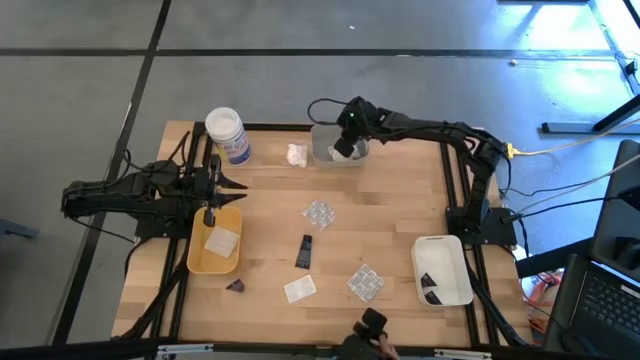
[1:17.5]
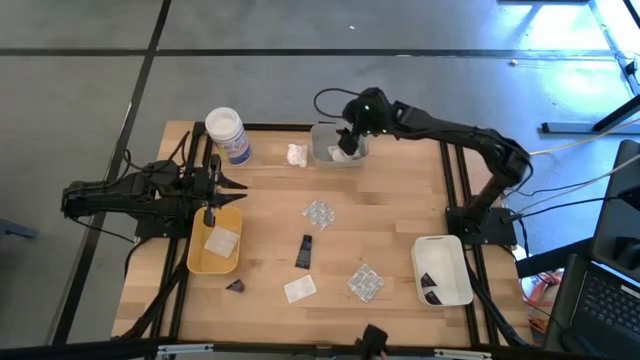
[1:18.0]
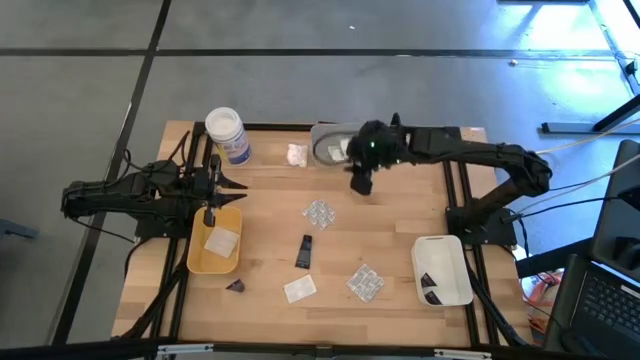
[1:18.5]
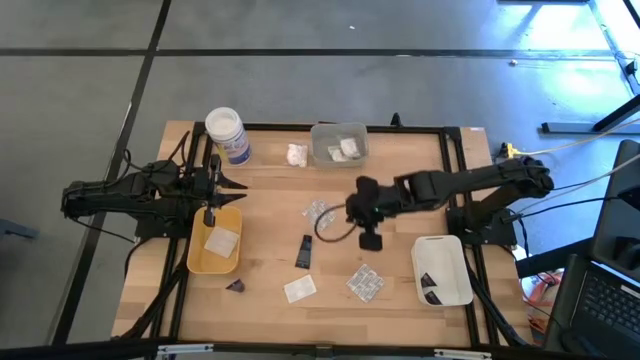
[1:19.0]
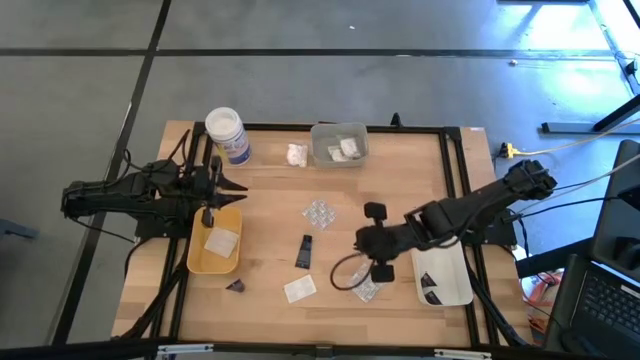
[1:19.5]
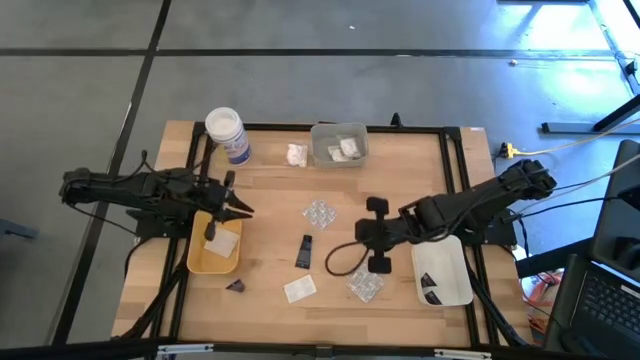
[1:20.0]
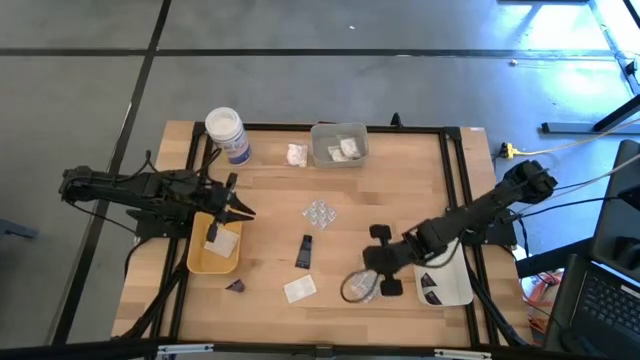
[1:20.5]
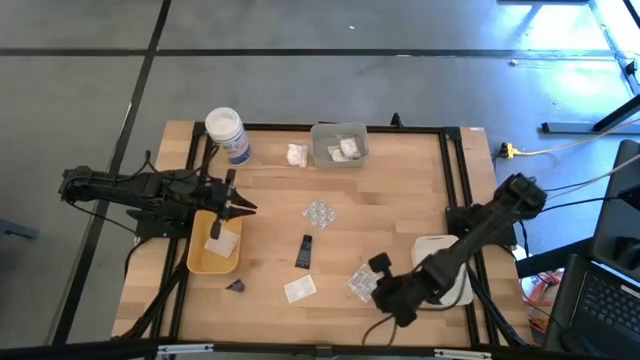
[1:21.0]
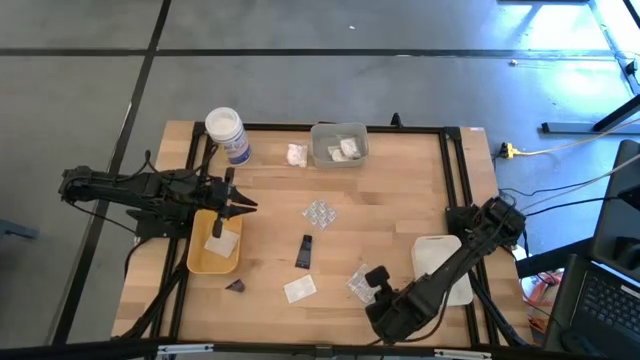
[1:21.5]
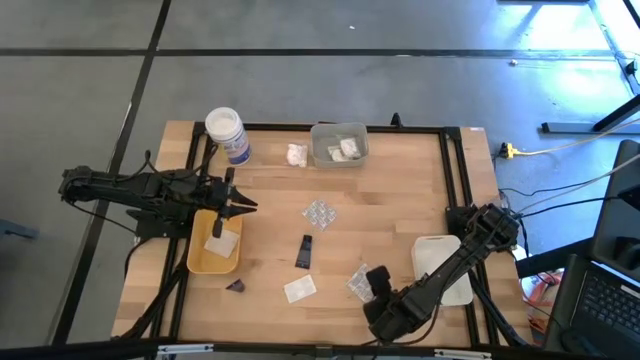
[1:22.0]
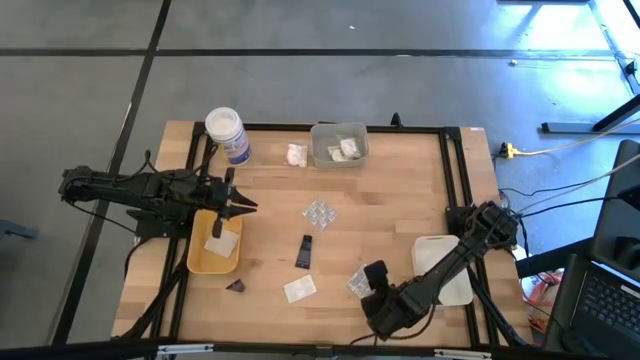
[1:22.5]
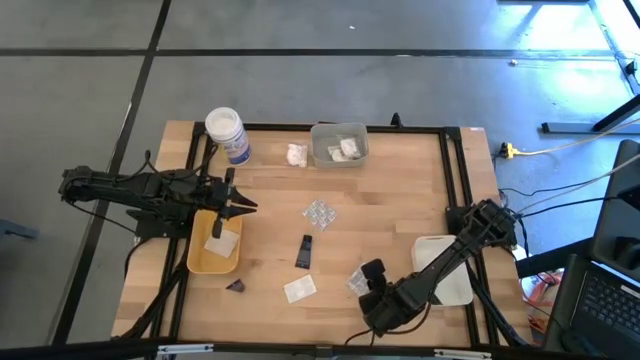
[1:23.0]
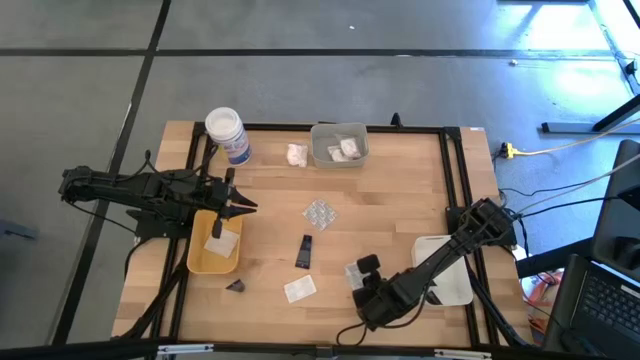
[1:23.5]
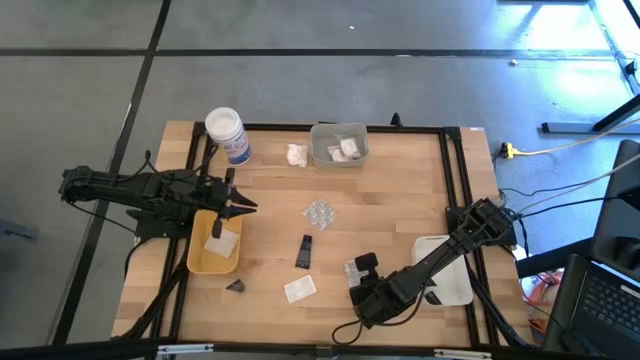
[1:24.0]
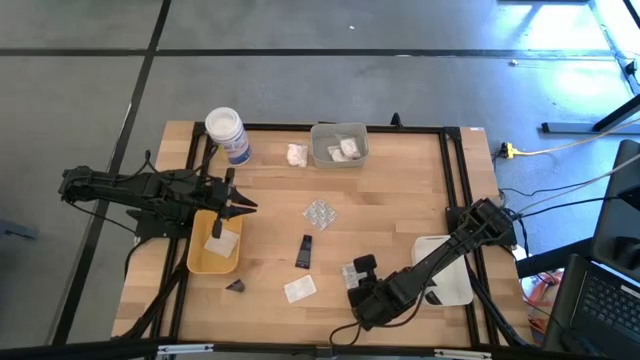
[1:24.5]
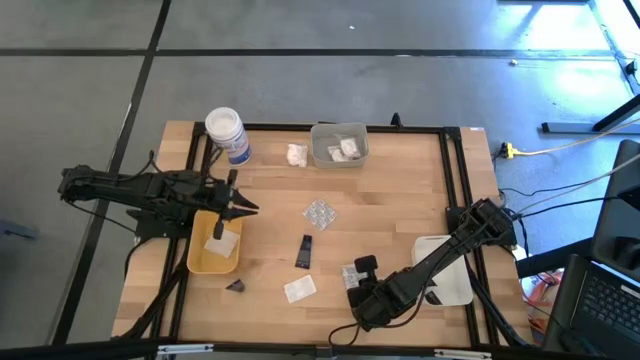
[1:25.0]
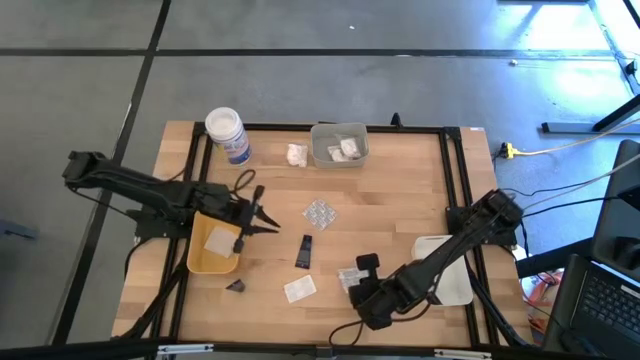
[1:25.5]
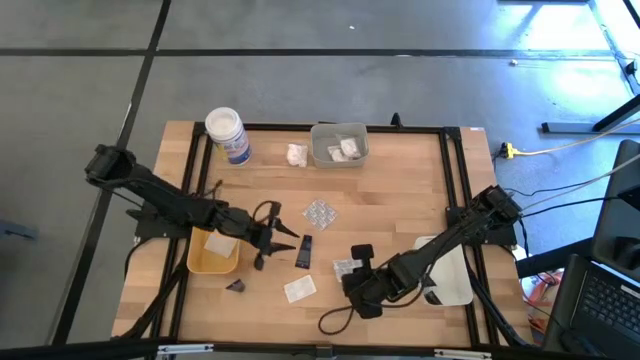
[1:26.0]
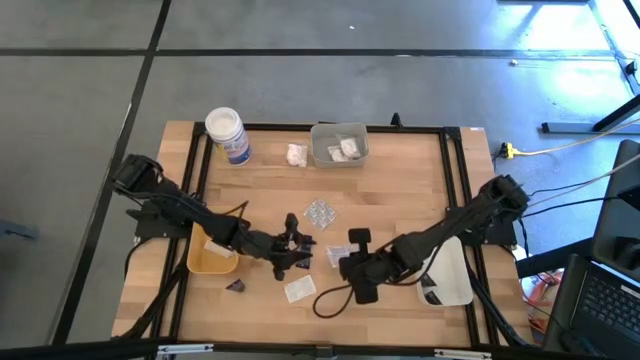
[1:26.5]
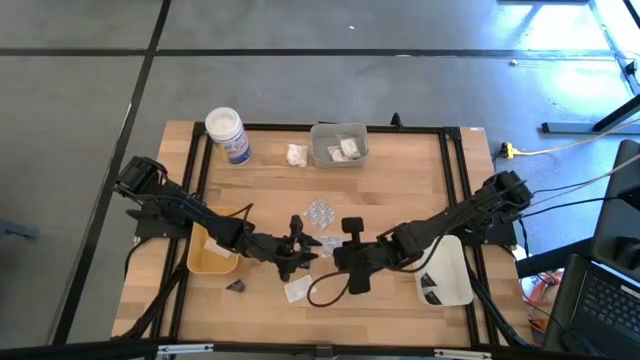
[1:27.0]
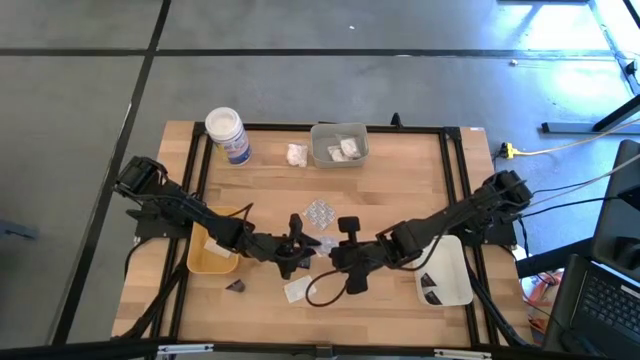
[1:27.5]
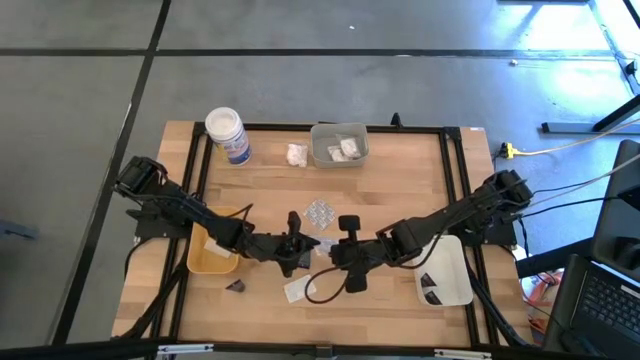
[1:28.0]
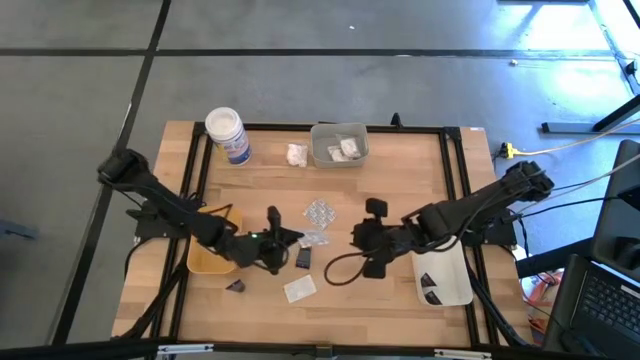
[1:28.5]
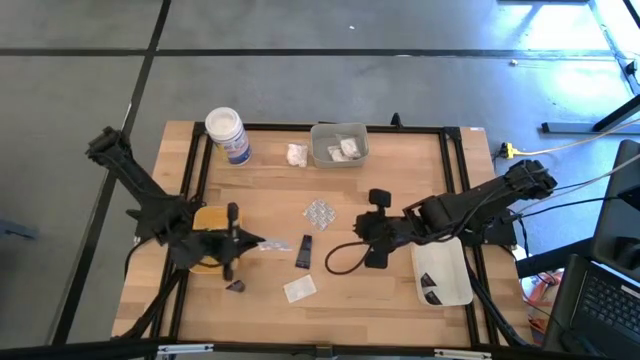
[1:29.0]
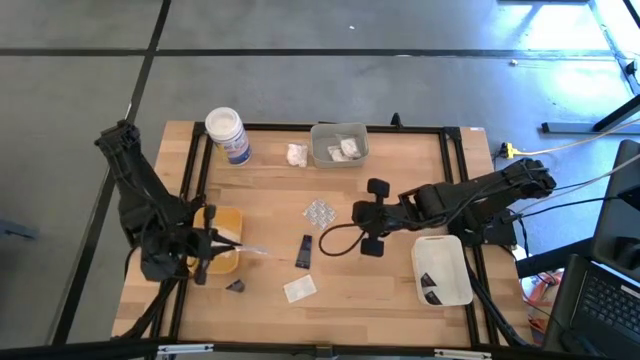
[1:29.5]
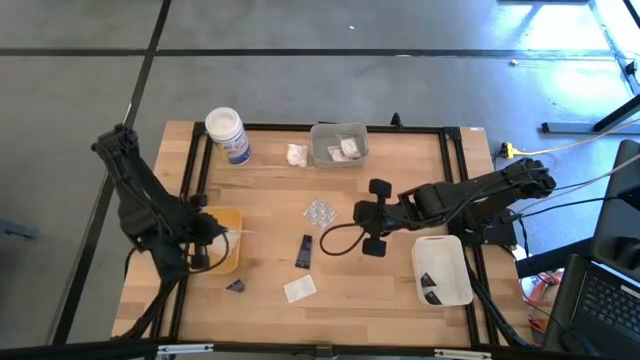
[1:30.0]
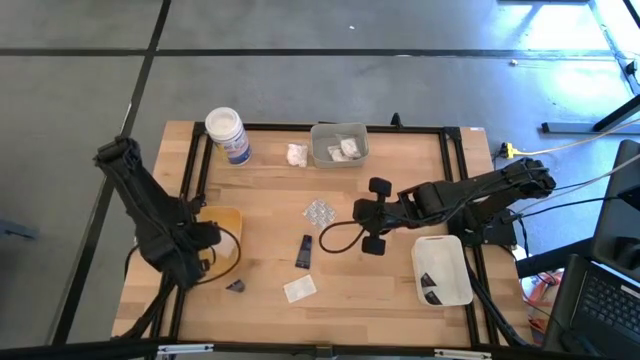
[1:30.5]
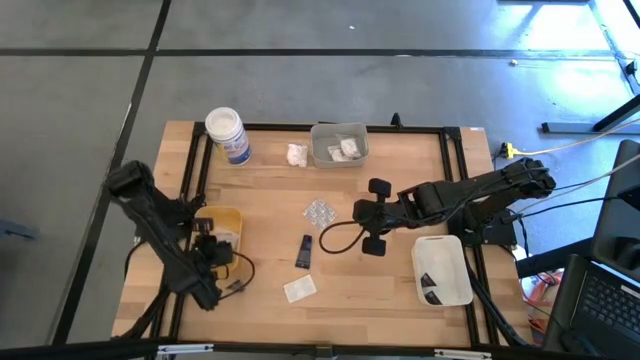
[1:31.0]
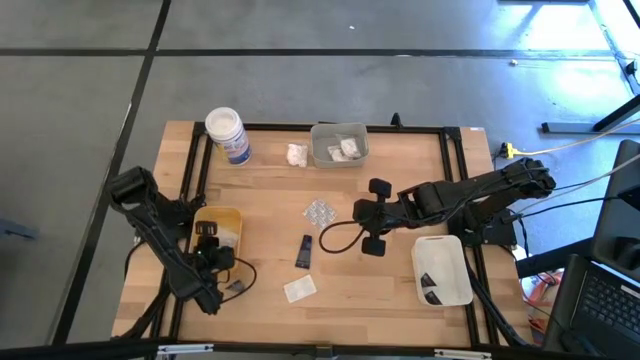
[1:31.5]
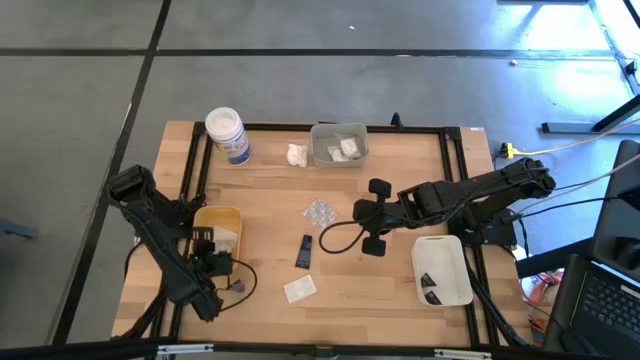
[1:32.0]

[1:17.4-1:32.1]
Task: Pick & Place Travel size toiletries
Put the white bandage pack into the yellow bin

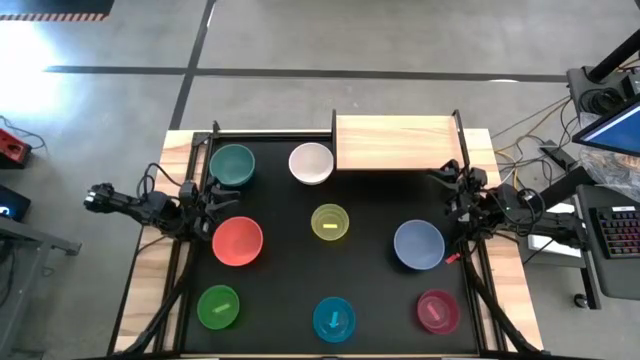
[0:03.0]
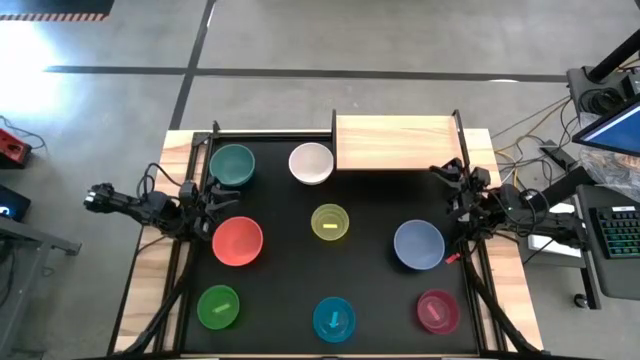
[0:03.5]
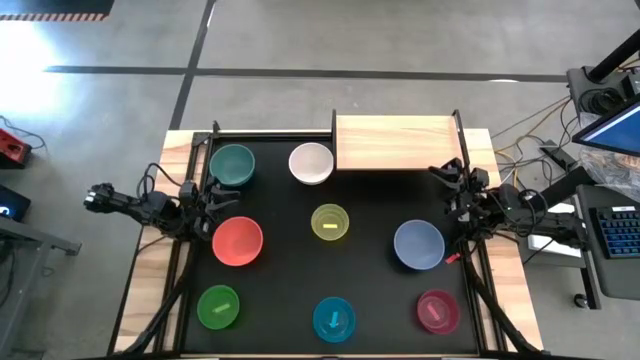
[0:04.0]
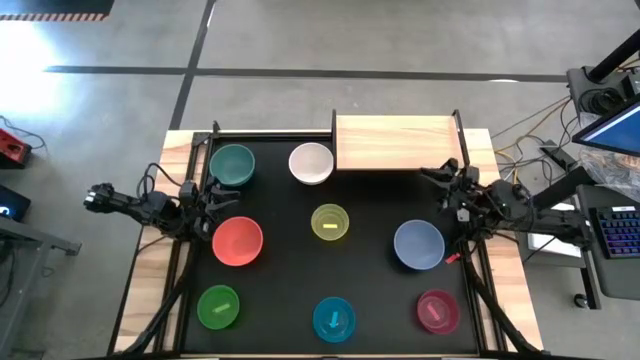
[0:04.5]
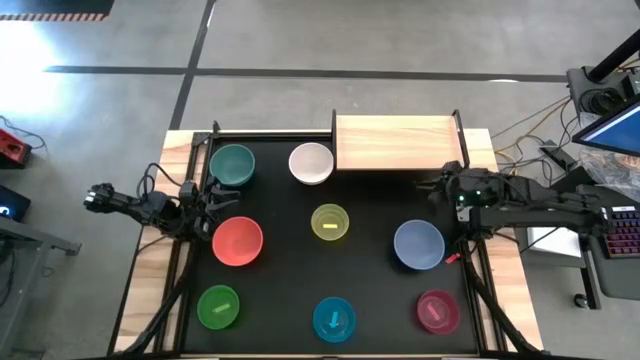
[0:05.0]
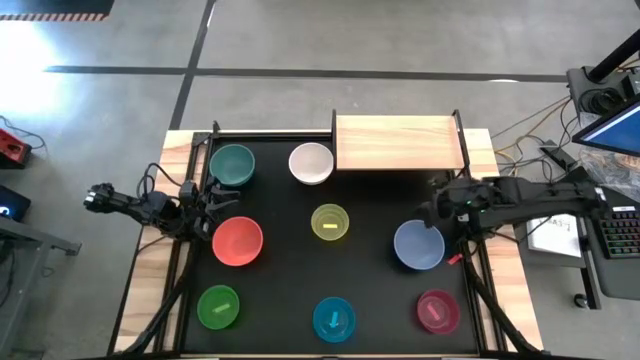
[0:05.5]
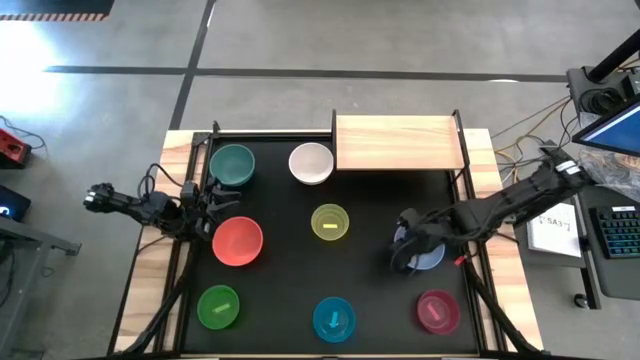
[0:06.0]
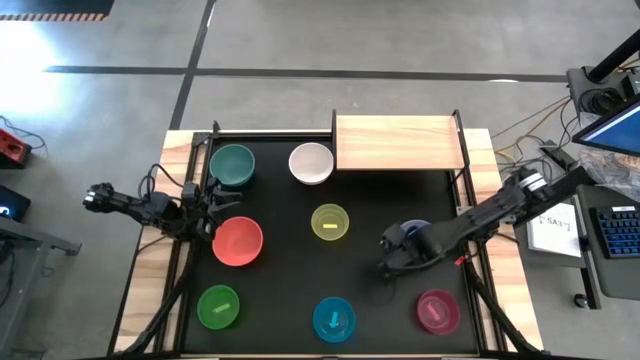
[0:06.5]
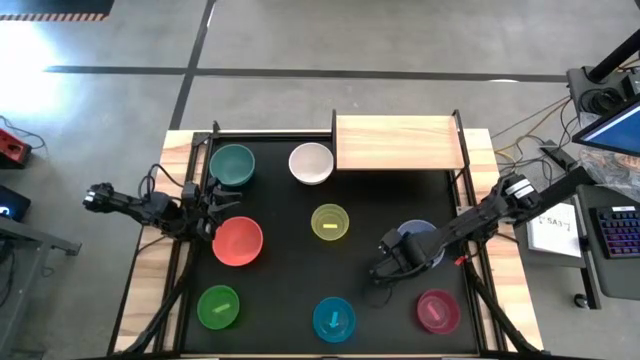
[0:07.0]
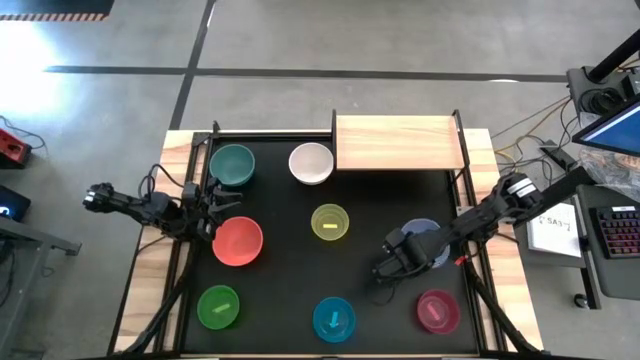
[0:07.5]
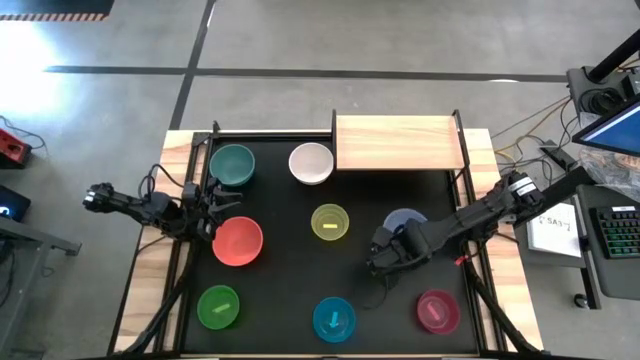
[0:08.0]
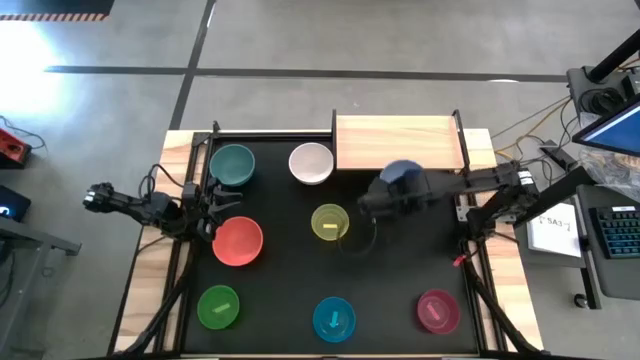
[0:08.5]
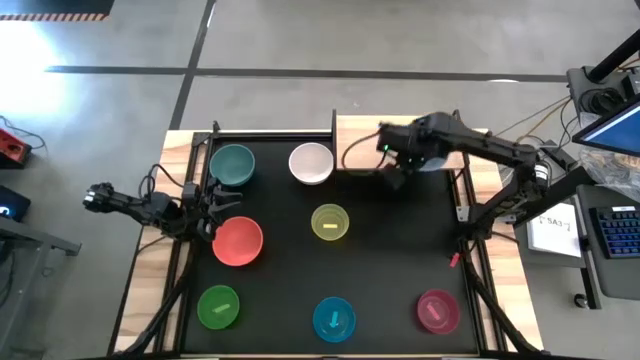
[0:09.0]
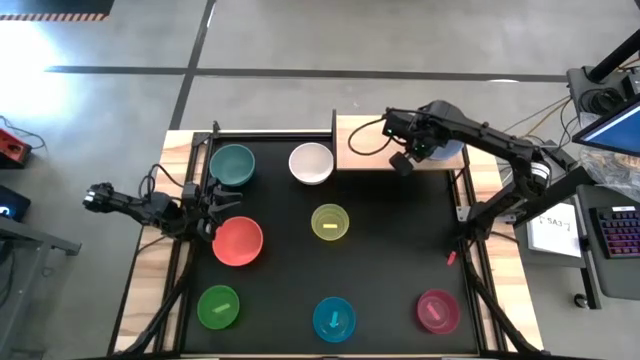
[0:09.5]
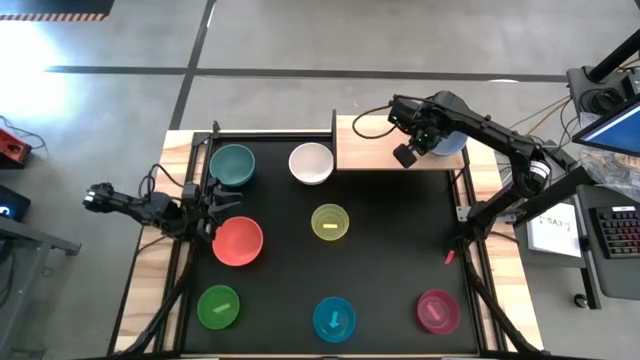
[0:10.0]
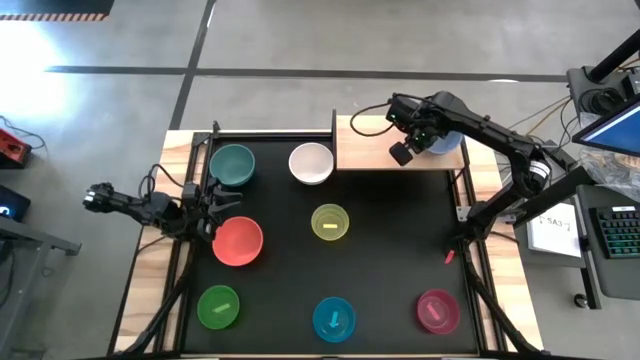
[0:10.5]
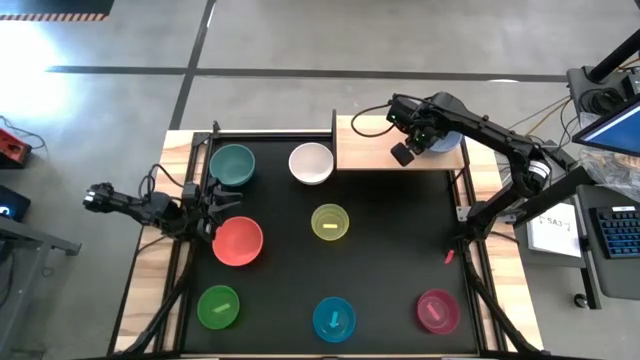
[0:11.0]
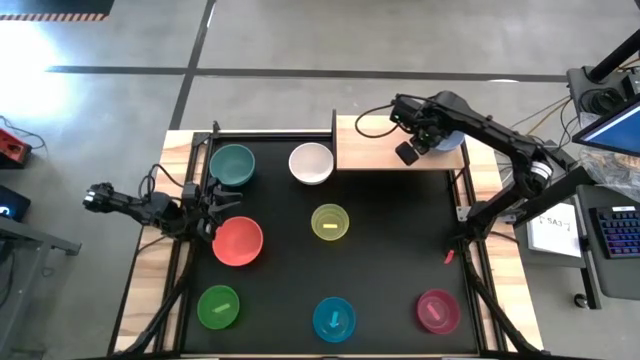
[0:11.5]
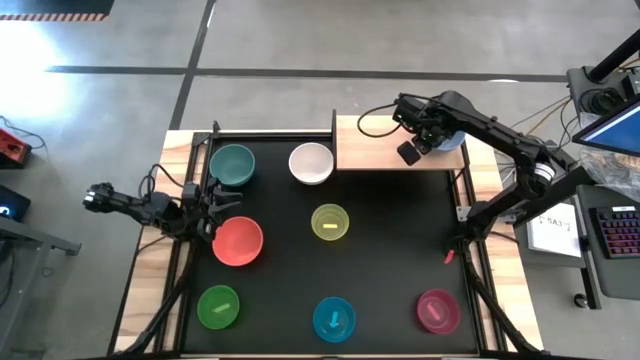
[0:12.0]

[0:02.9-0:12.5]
Task: Place and stack bowls onto a shelf
Put the blue bowl on the shelf
